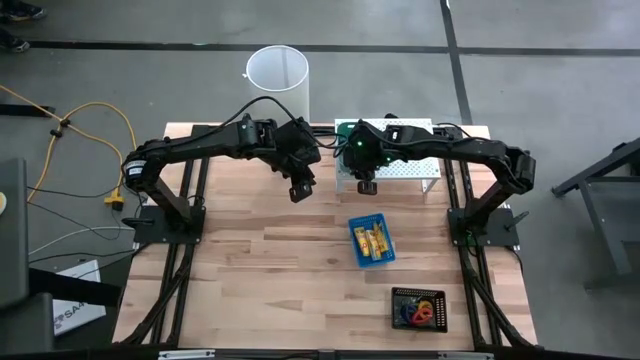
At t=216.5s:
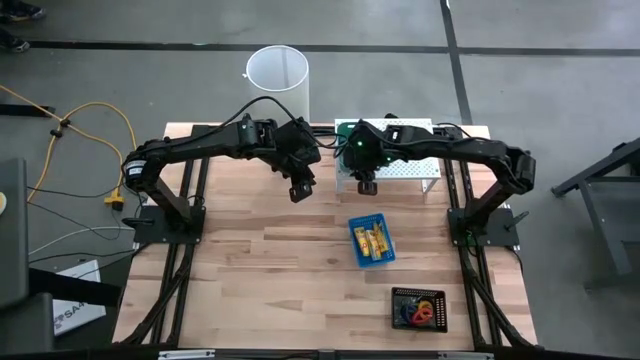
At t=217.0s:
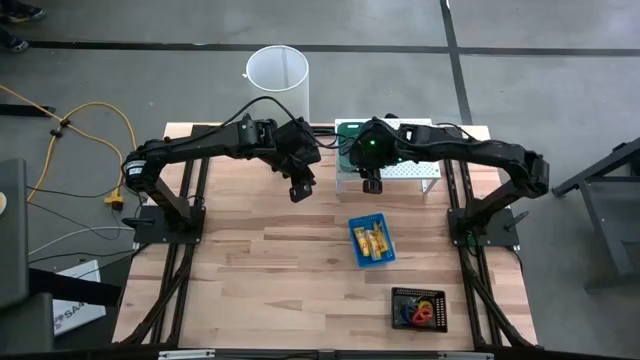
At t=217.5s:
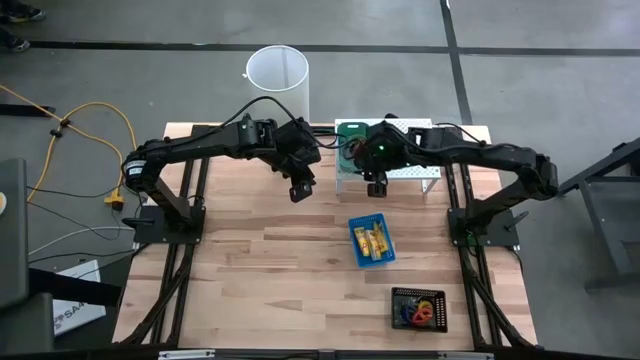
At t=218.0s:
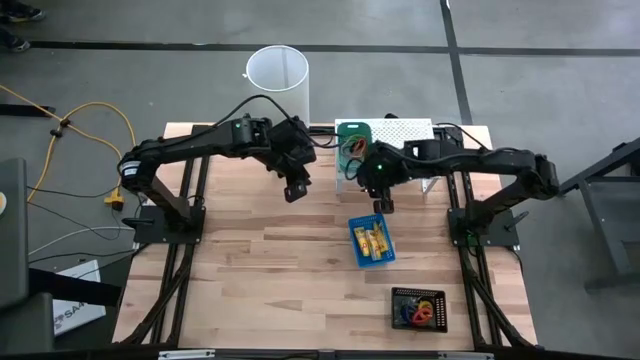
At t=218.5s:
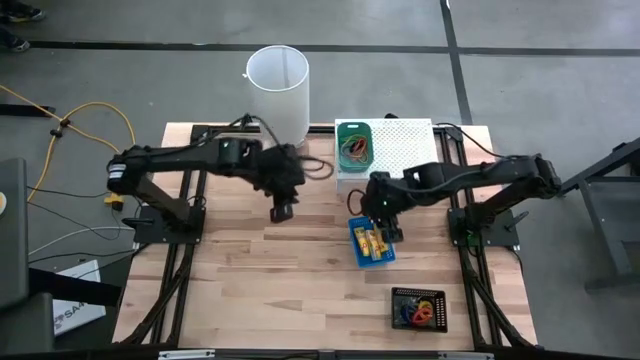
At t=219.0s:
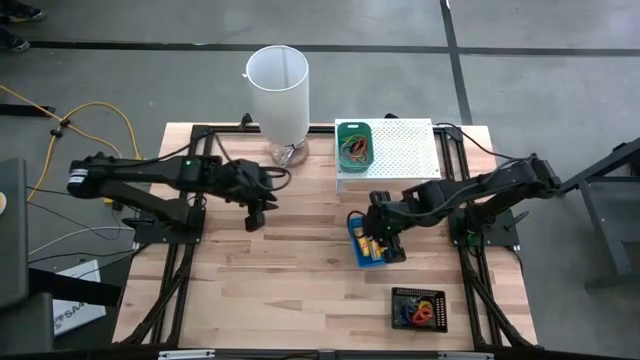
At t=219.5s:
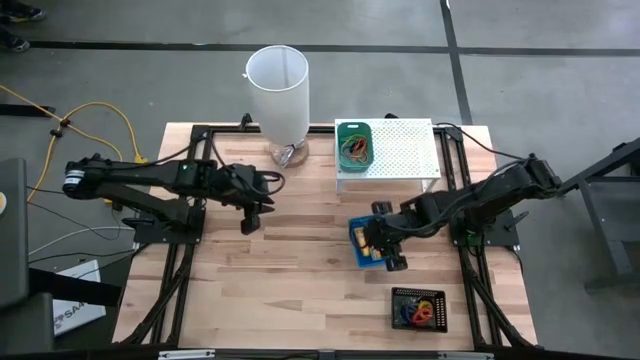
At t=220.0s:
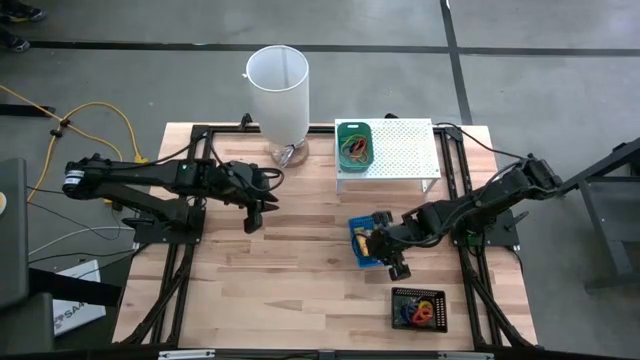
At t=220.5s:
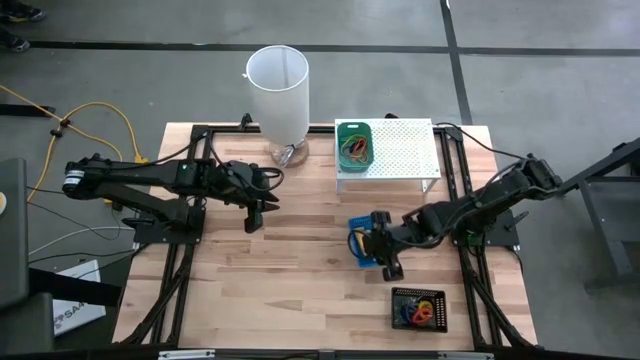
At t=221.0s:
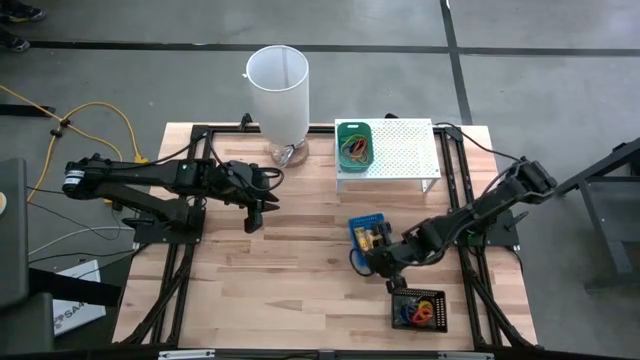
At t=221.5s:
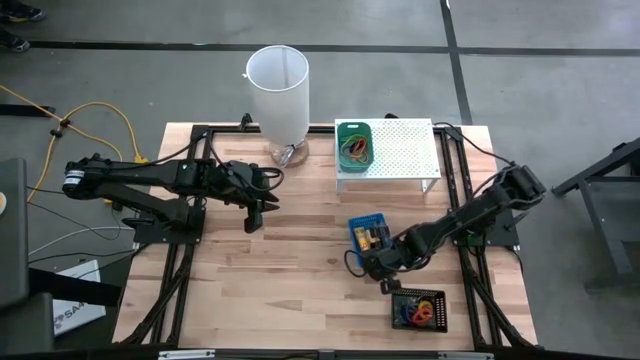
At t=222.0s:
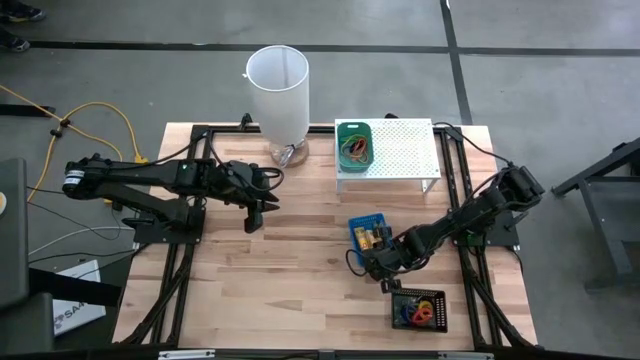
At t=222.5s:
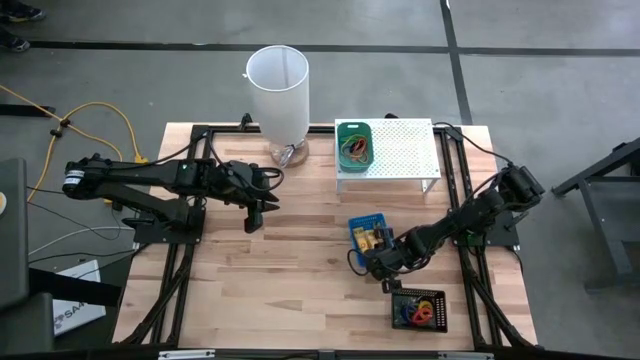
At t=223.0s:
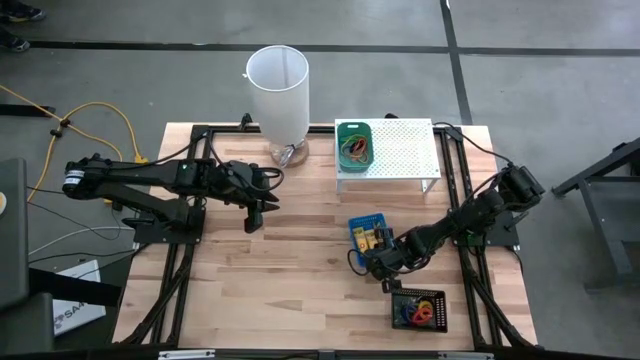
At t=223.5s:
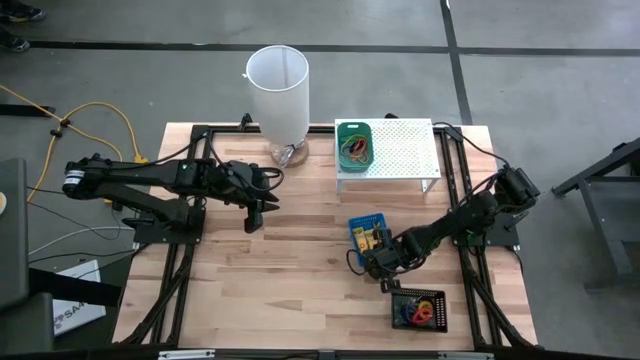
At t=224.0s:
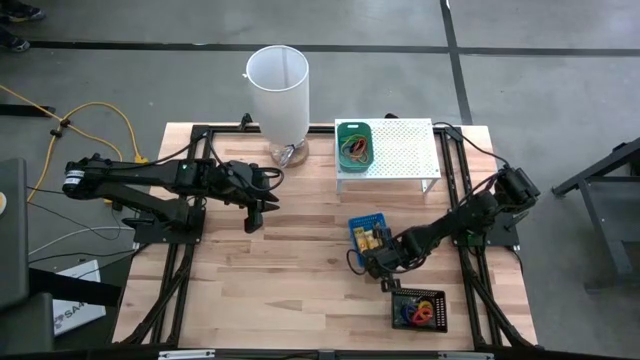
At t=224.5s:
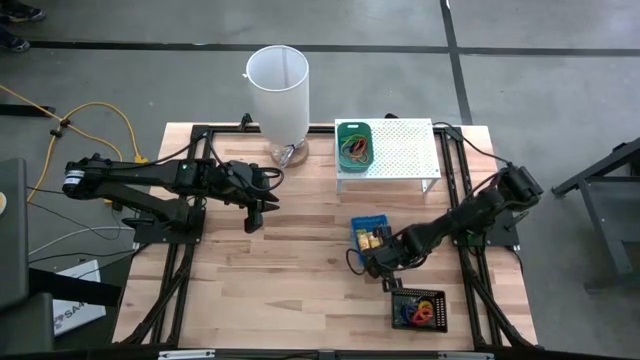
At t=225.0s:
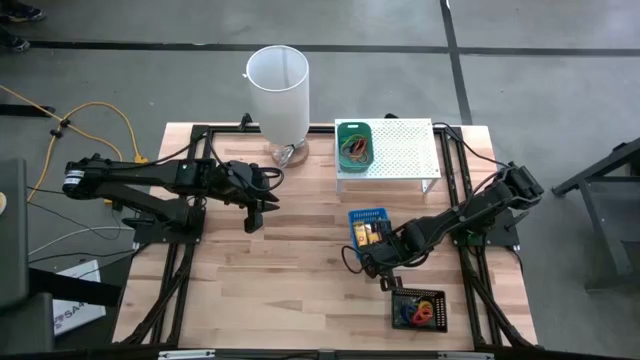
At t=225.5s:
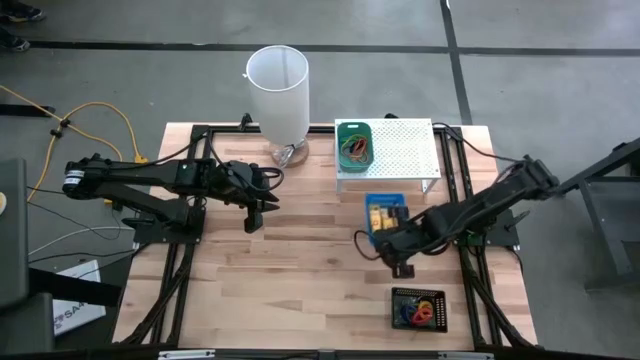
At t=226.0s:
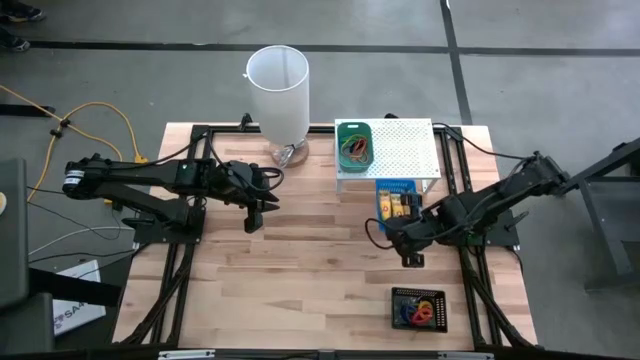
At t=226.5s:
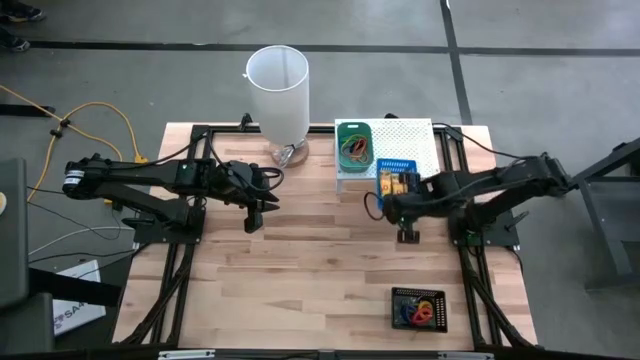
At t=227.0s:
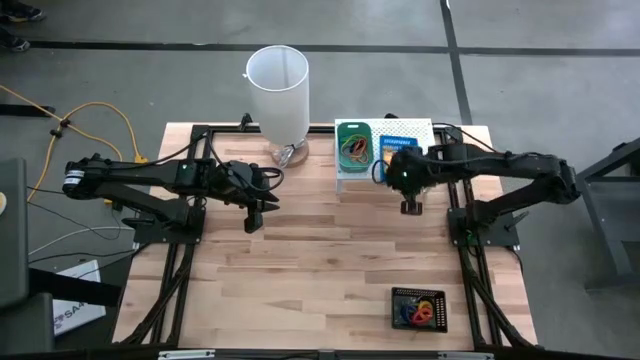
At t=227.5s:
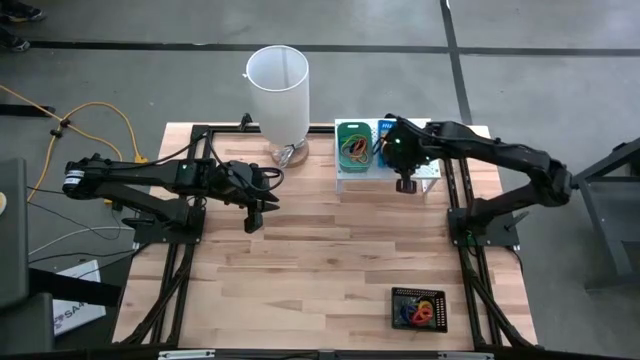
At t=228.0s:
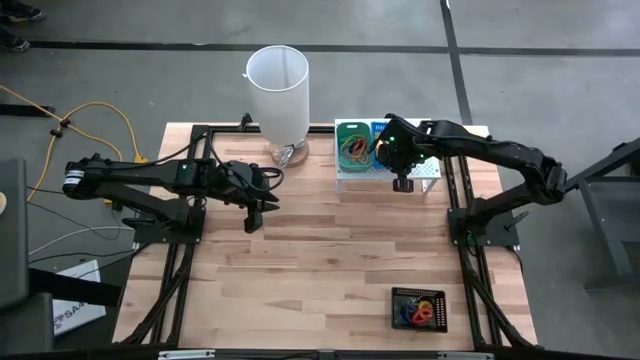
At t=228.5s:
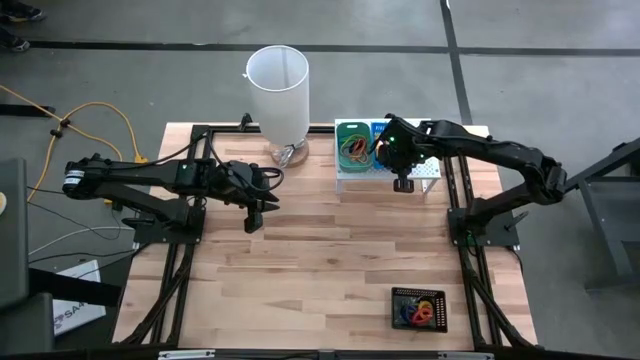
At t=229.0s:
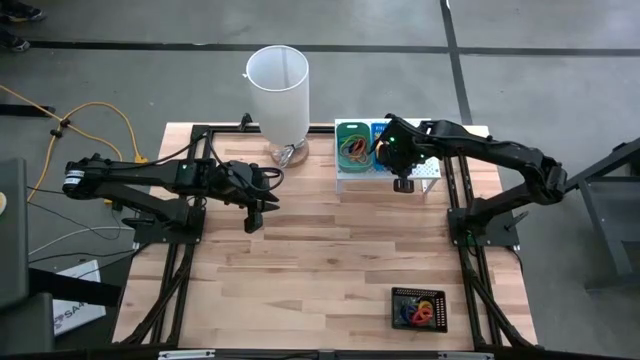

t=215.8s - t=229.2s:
Task: Pick & Place Office Desk Supplies
Put the blue bin on the shelf

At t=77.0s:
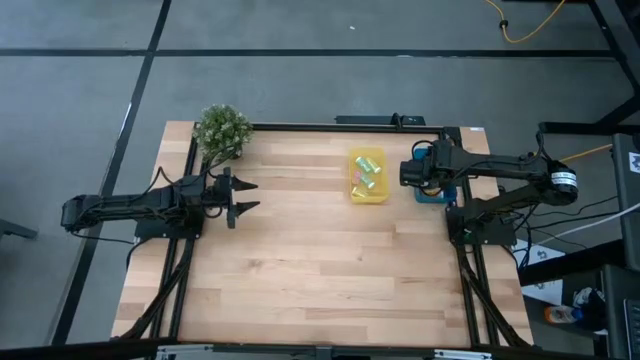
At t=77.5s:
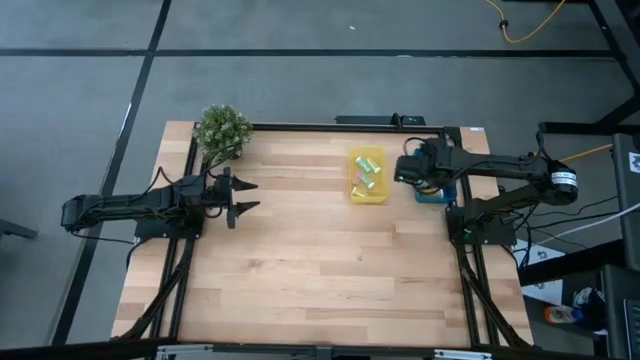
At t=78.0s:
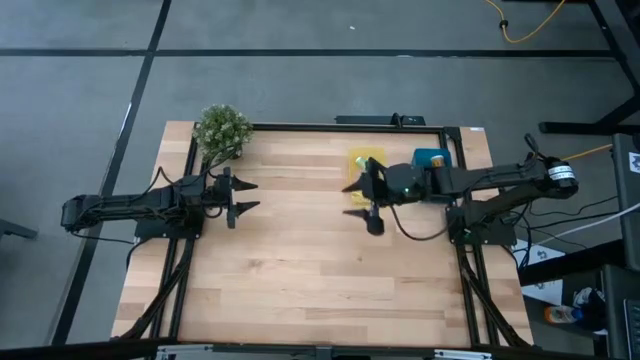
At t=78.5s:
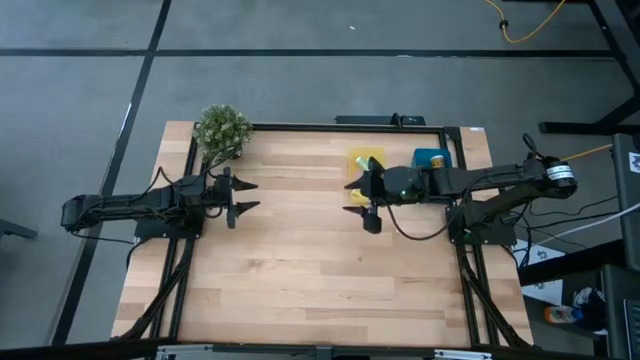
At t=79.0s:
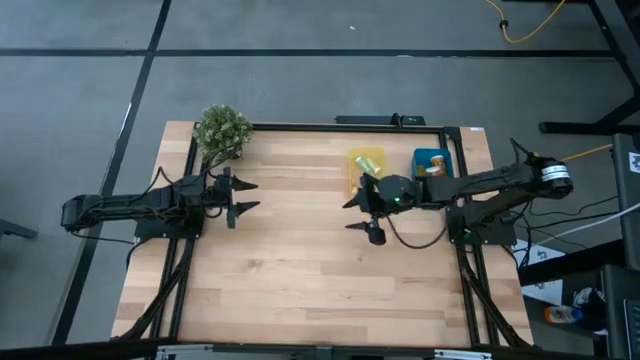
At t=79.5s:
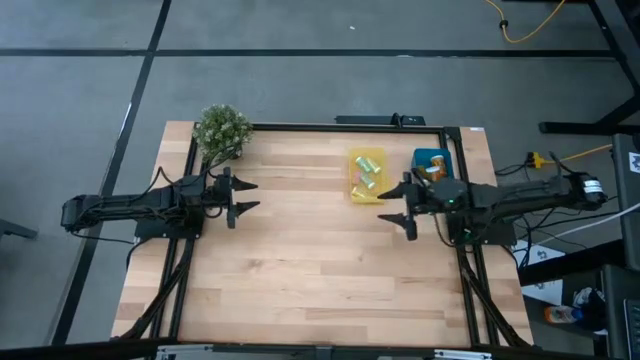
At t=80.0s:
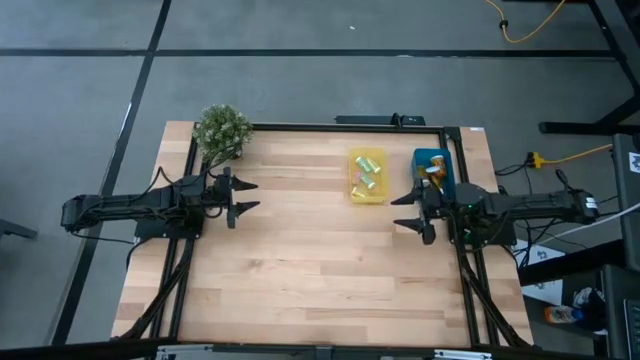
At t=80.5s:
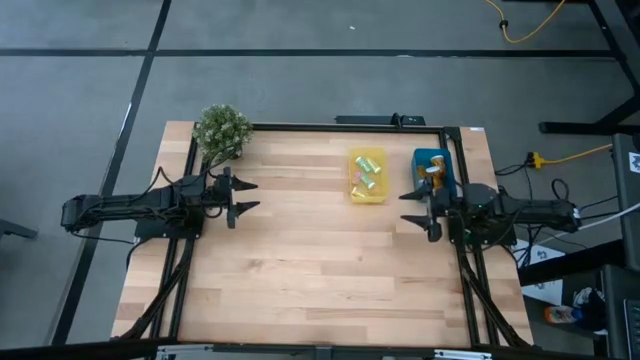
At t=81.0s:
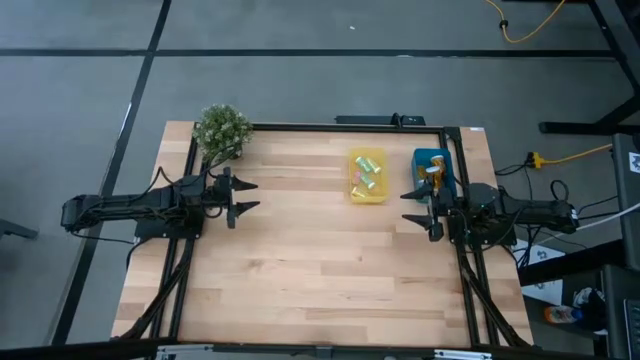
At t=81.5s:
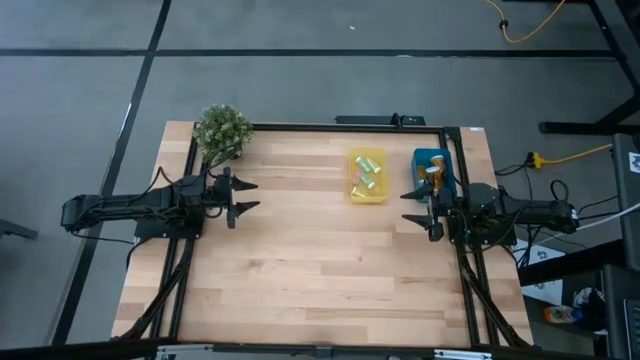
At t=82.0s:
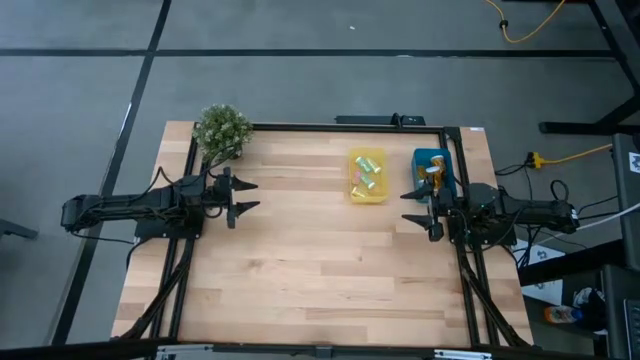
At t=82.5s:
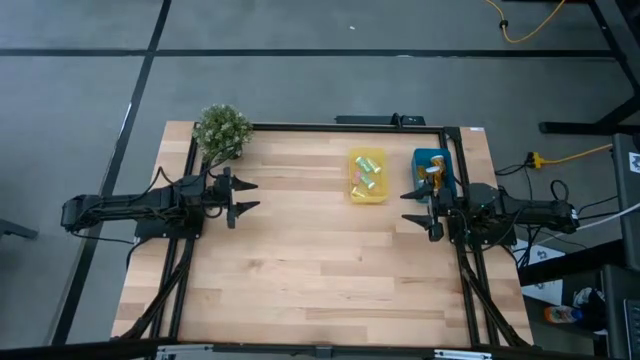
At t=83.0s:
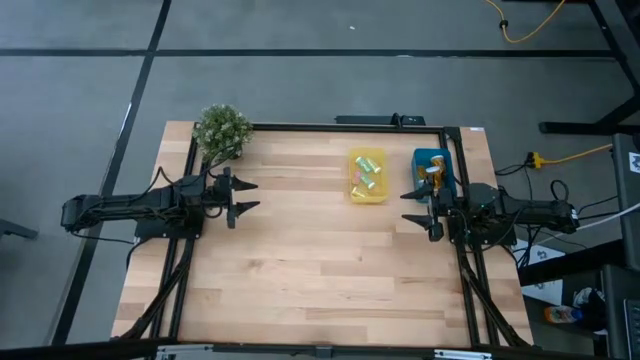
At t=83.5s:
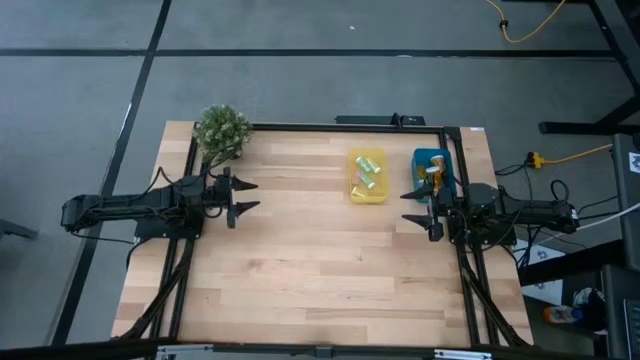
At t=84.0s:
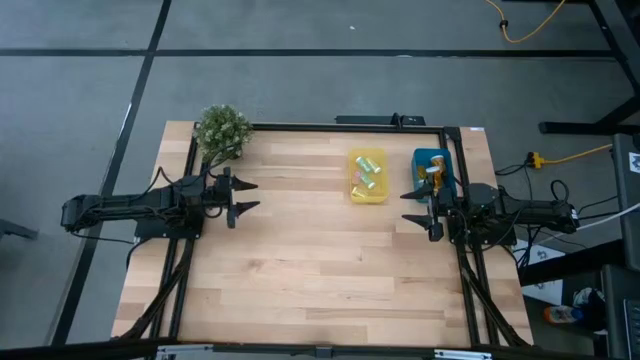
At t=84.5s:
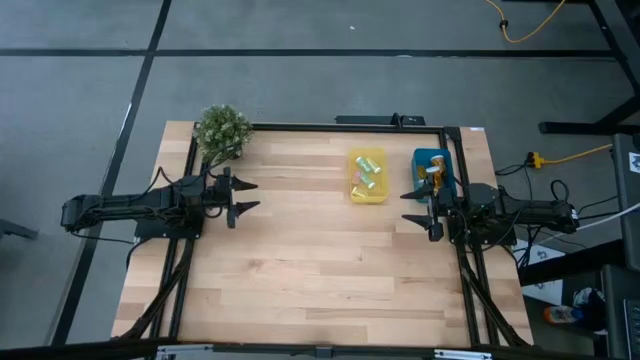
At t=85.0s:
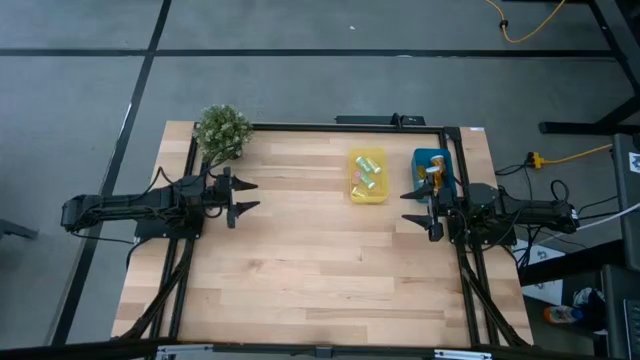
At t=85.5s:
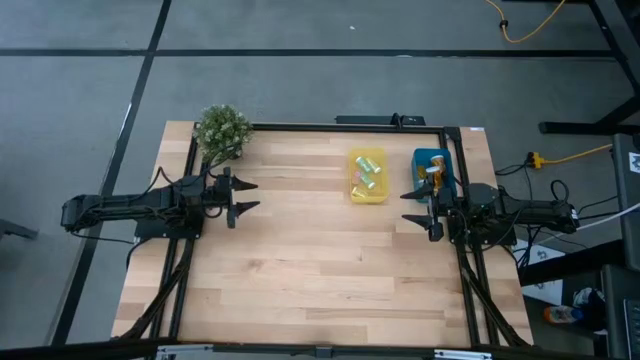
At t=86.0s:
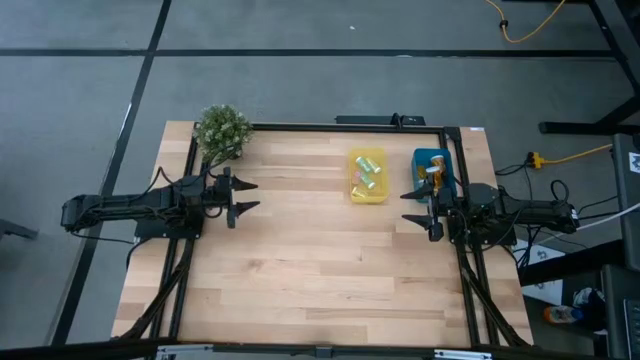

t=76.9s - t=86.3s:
Task: Pick and place medicine bottles into bin by pill shape (circle, oval)
Return to Home Position
